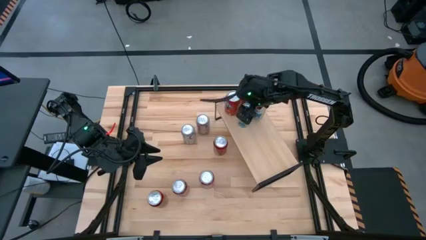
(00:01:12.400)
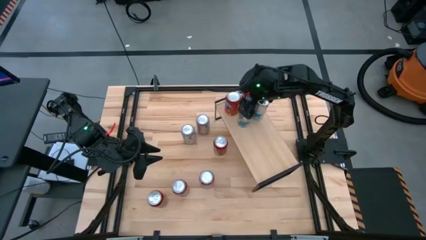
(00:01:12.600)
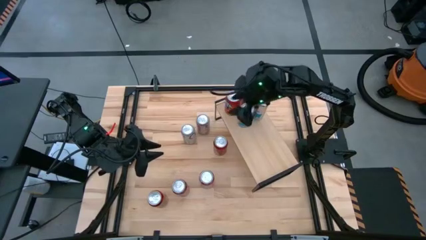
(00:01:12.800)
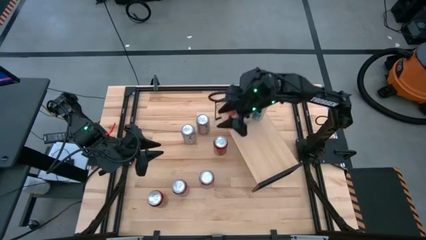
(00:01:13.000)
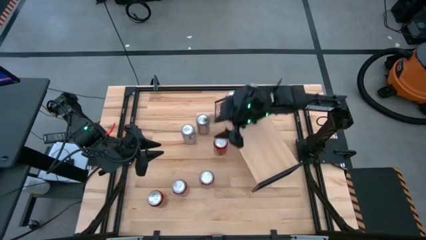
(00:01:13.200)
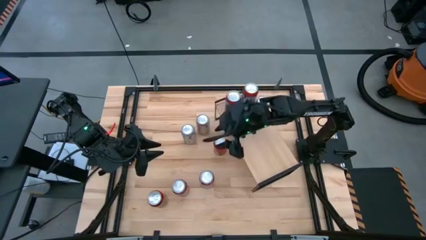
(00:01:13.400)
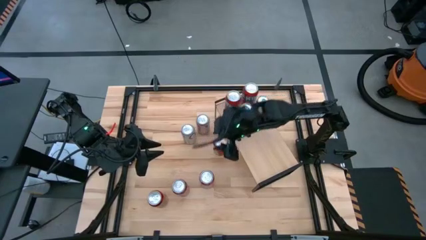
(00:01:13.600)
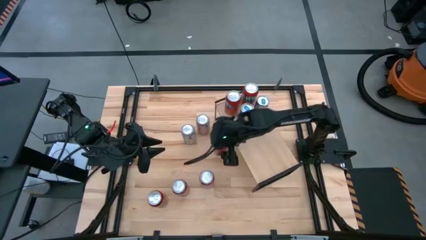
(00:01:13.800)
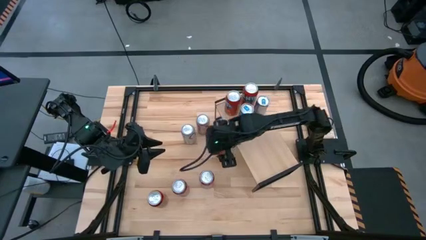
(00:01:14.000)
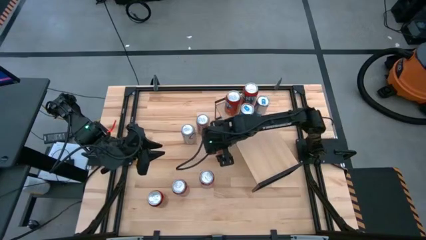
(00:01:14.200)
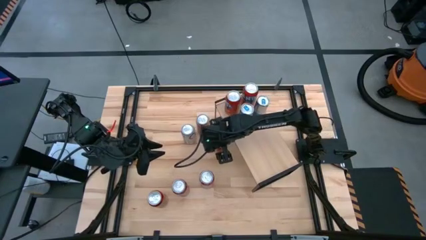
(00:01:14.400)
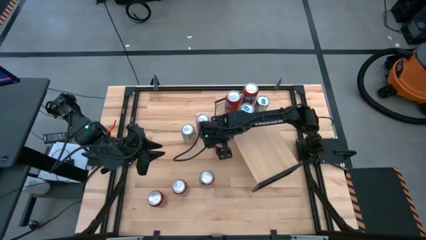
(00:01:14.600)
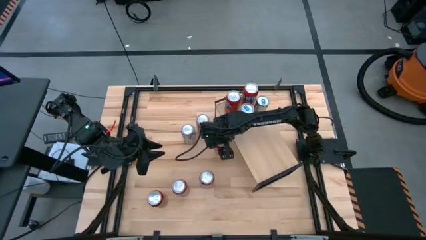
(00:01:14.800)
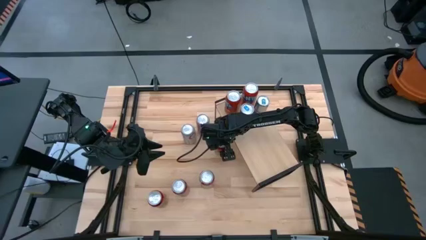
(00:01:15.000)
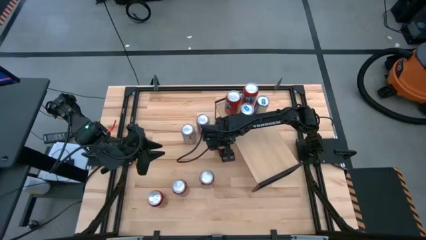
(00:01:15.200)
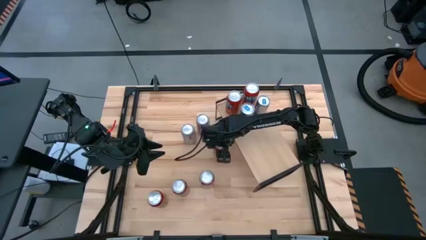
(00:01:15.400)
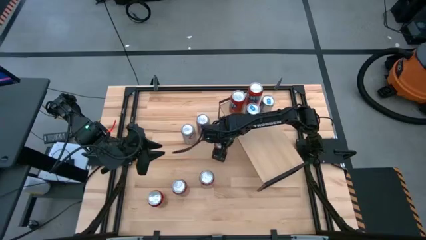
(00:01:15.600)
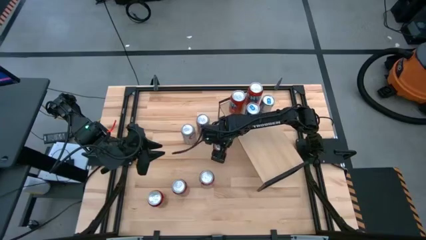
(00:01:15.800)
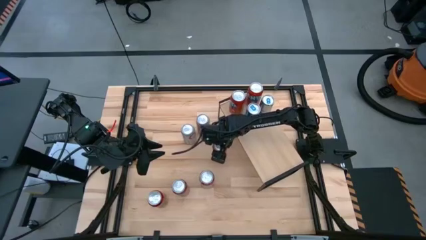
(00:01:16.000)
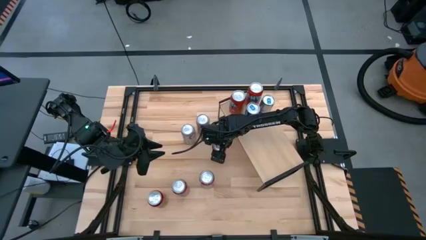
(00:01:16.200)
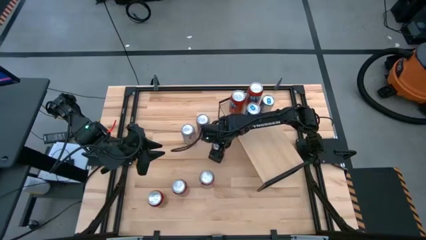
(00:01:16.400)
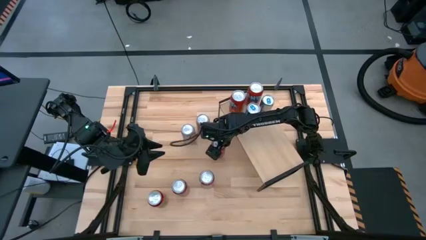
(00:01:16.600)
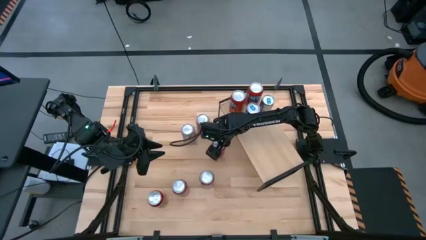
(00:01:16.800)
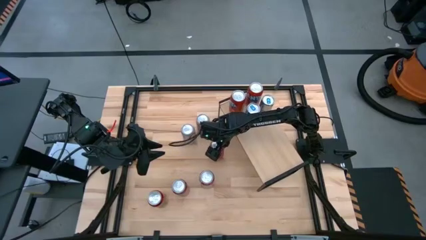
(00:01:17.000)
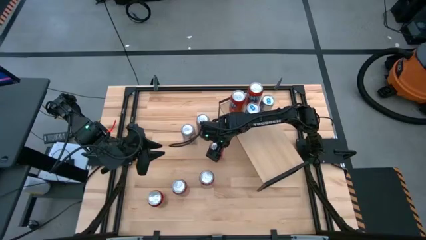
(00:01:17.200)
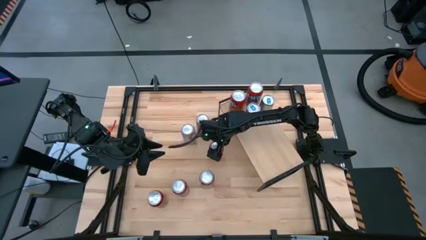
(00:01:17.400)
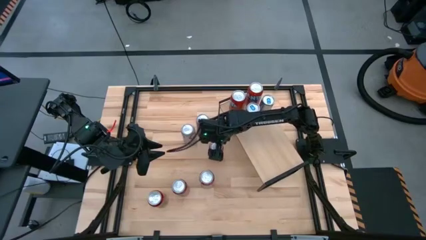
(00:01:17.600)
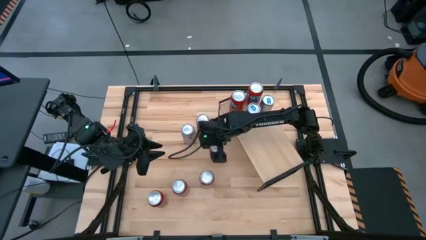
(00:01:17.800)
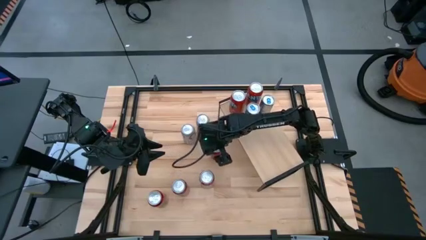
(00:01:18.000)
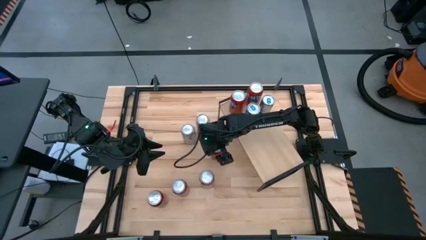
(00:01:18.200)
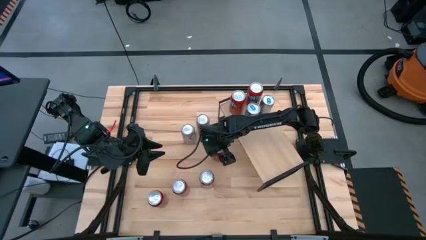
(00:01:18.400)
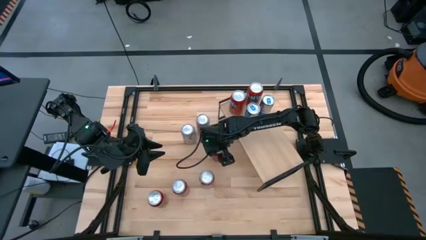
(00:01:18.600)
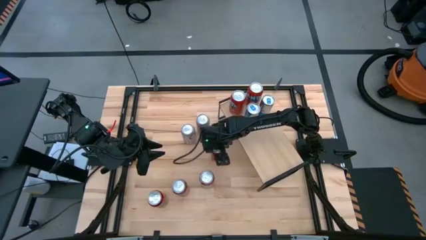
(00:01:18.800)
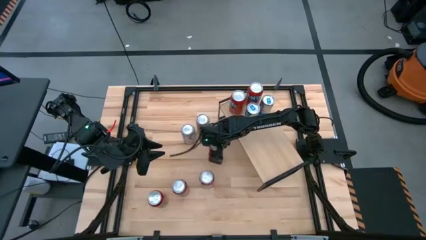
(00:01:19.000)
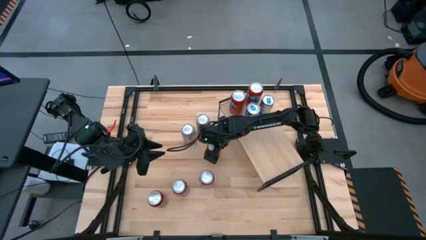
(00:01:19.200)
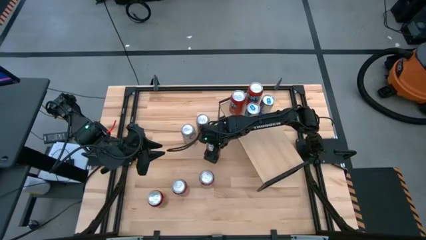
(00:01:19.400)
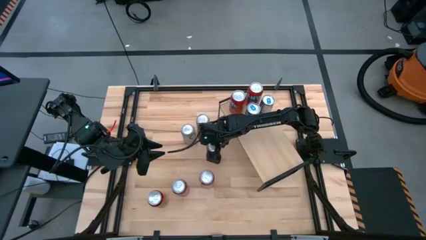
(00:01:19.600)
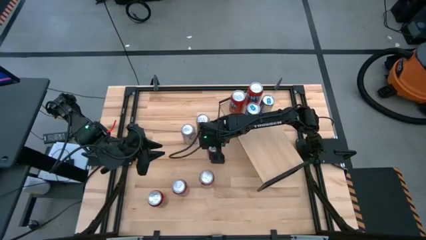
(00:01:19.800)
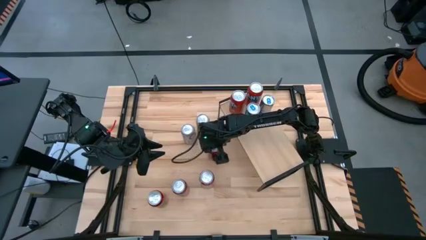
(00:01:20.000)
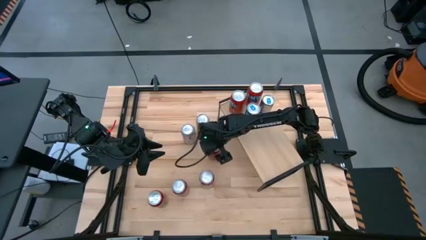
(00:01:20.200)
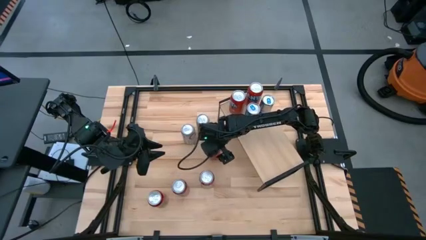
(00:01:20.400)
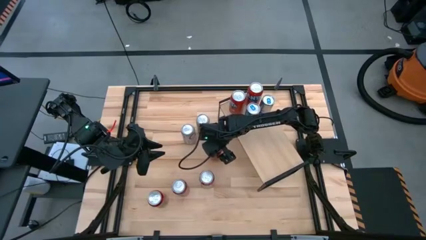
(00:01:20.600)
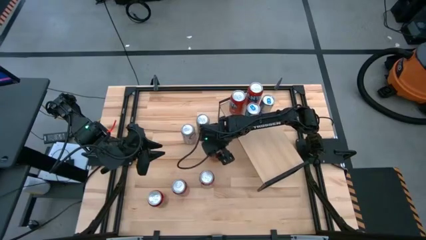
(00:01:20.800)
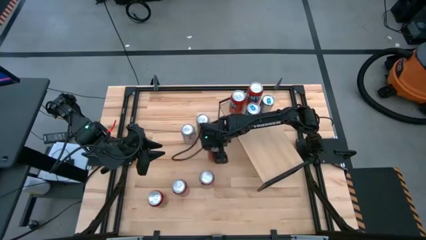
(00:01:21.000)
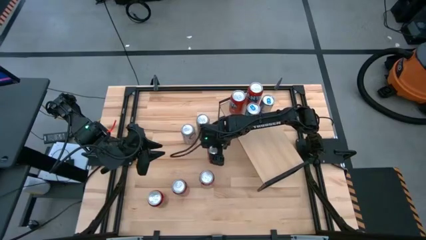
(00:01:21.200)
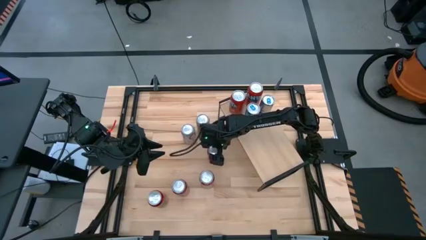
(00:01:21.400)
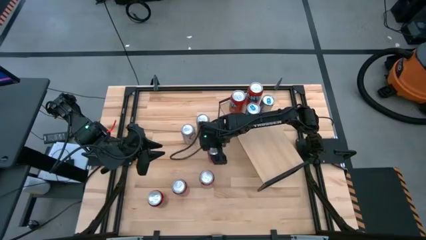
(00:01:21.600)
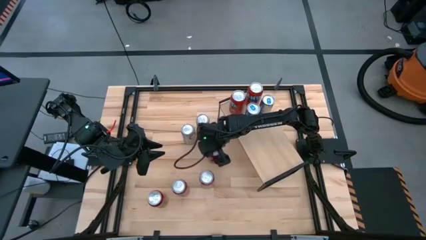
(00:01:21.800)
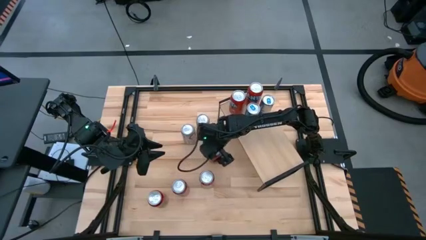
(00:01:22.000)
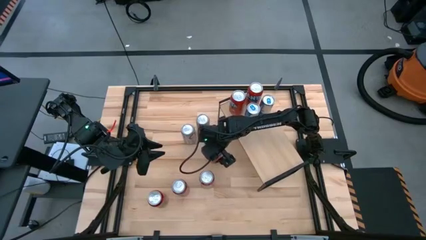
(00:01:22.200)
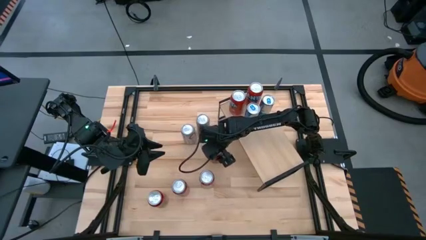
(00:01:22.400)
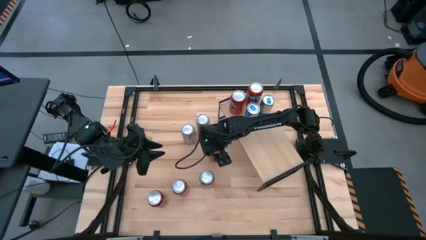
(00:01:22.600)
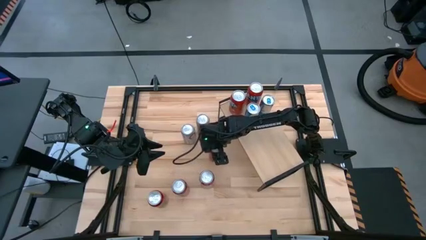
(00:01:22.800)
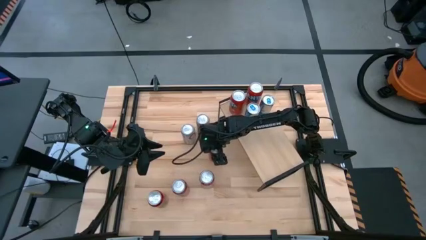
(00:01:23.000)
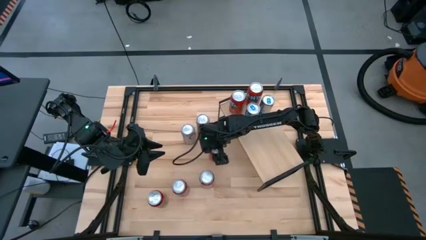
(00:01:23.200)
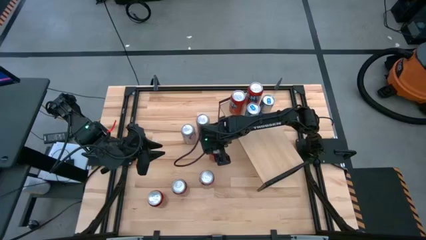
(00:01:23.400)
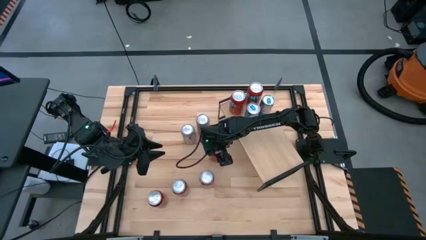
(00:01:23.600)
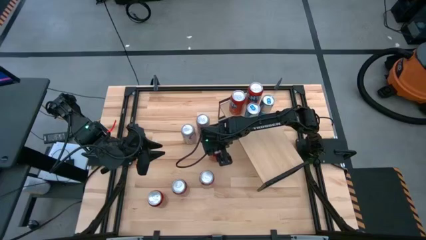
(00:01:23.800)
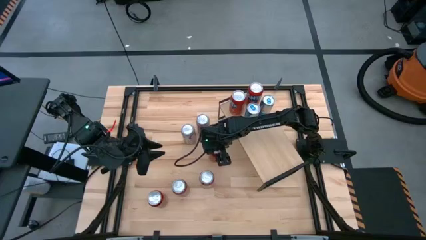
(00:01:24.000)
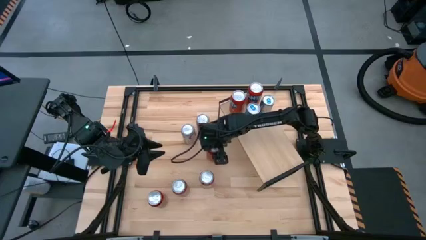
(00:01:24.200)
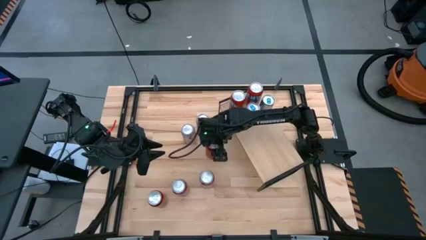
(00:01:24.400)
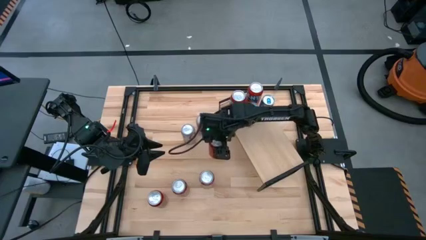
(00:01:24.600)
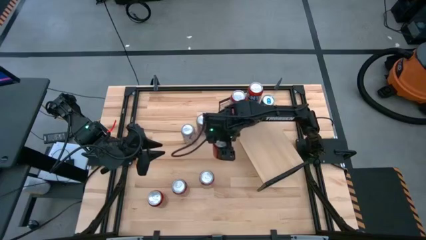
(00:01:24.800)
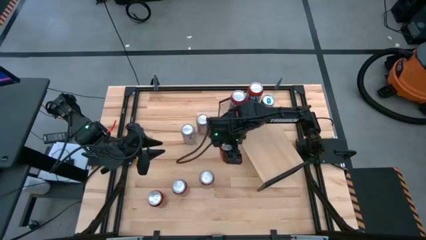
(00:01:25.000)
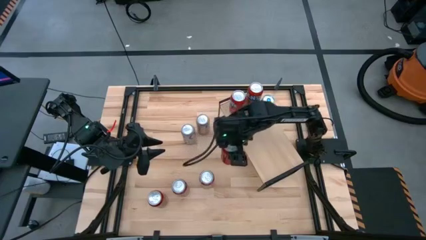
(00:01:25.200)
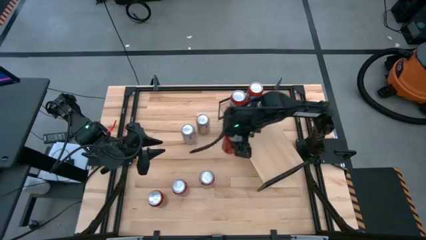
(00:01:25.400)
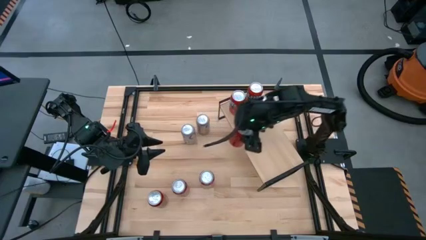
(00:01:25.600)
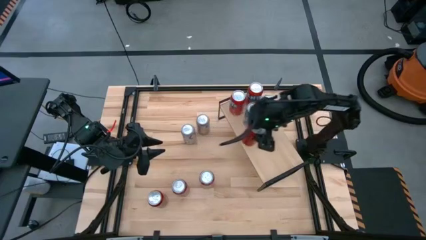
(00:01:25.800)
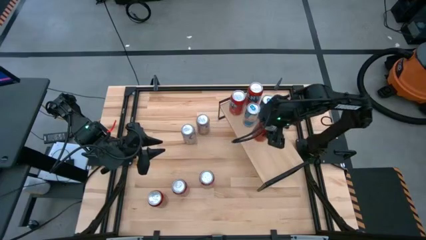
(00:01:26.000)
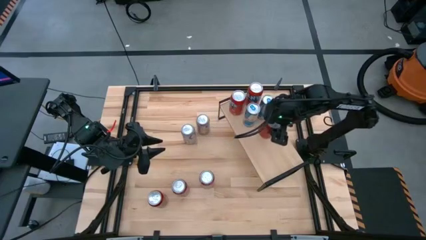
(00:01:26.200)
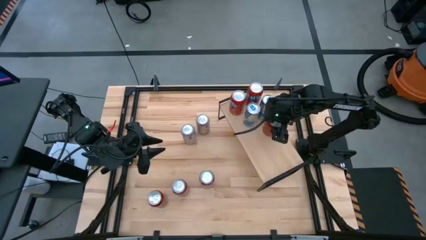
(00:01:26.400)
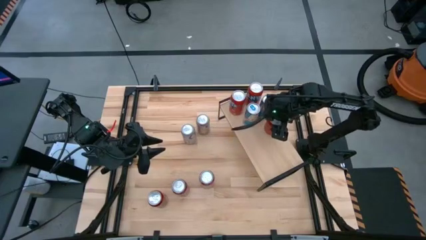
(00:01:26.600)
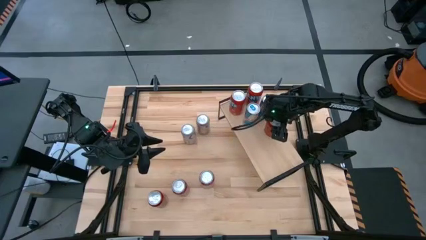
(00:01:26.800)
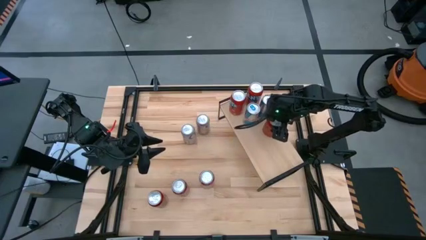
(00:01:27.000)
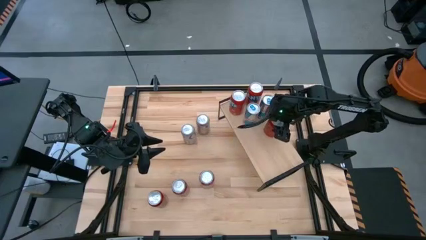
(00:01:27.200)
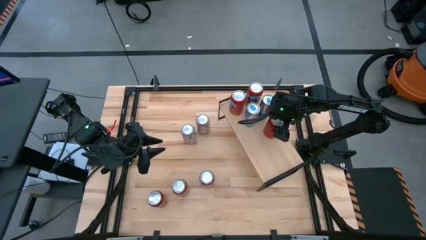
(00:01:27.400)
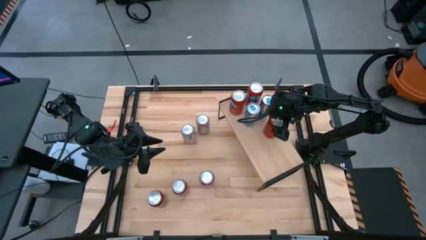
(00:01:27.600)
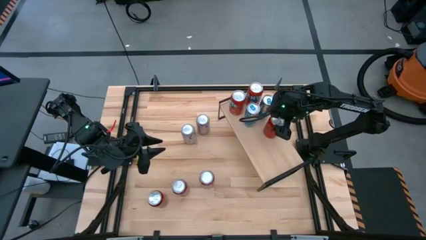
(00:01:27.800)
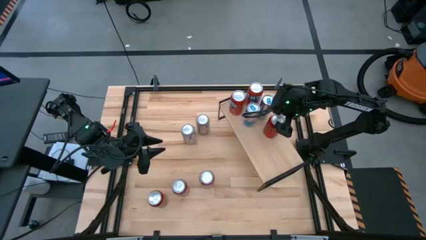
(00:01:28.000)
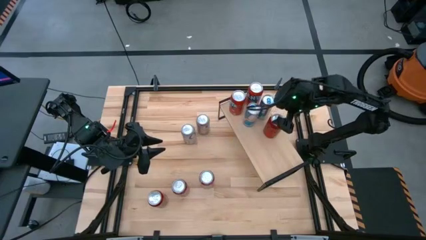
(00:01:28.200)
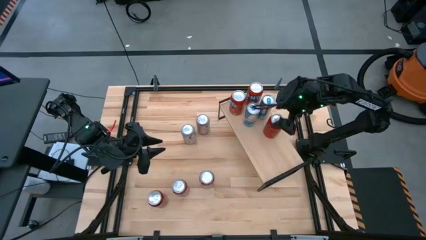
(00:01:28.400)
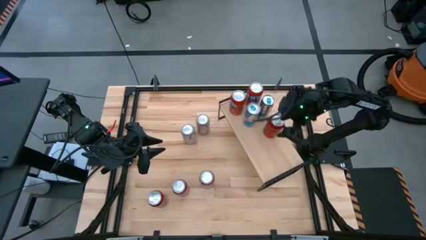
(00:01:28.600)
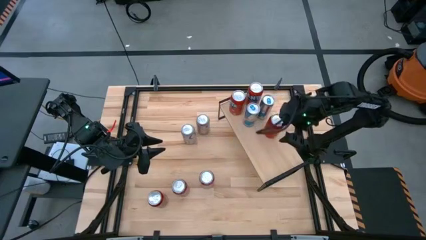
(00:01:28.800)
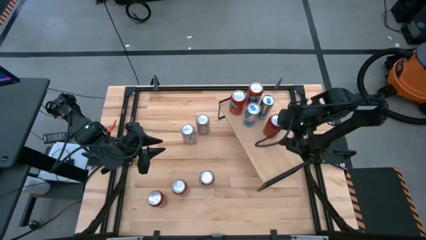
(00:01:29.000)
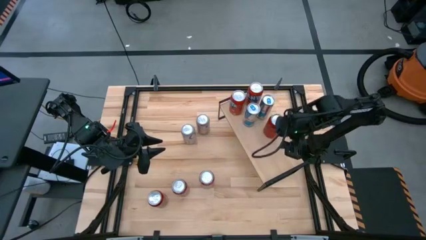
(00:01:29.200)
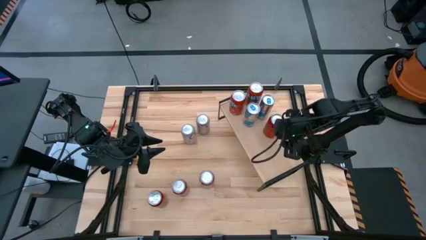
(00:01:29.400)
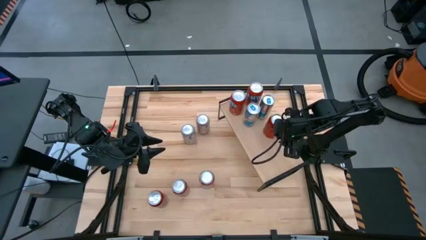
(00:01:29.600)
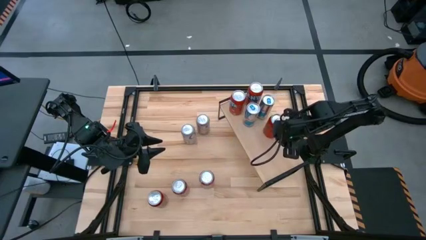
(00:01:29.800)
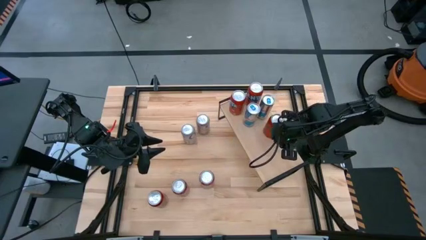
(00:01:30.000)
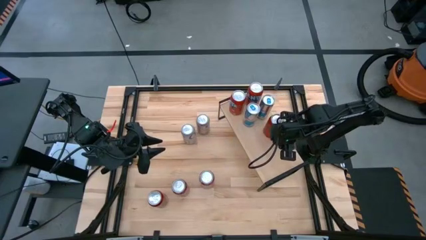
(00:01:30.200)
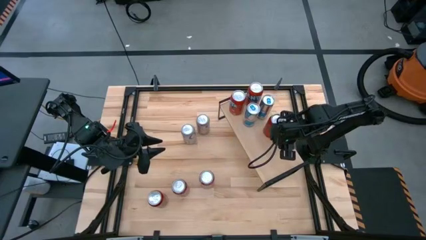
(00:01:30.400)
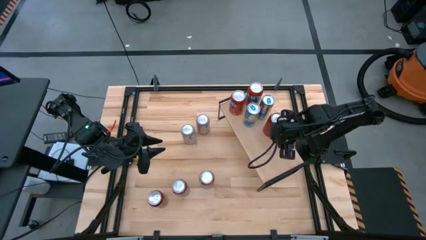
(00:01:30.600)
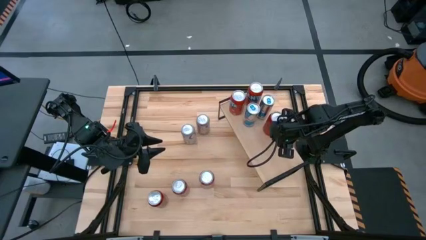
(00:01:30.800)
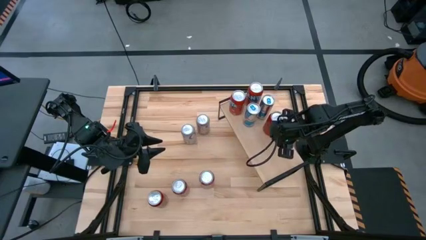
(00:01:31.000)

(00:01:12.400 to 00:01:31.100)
Task: Place canned beverage on shelf
Put the top dark red soda can on the shelf
